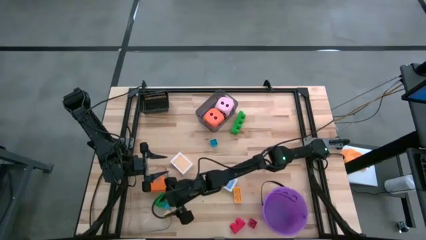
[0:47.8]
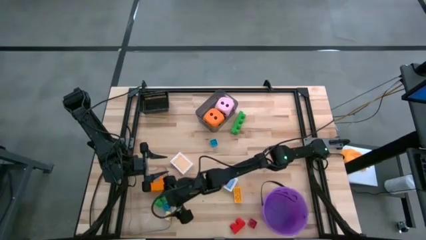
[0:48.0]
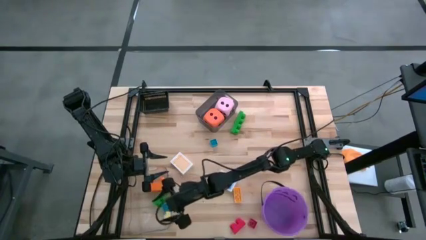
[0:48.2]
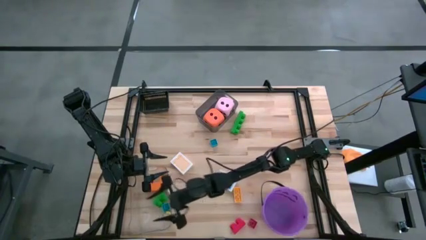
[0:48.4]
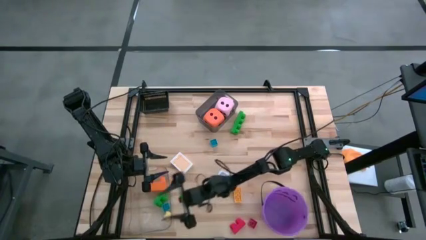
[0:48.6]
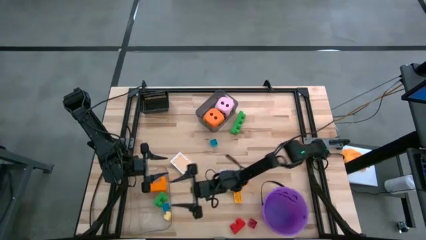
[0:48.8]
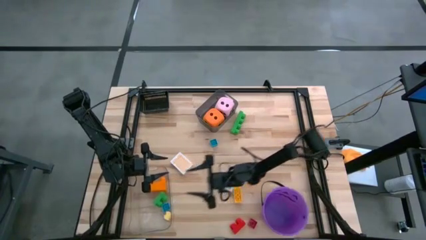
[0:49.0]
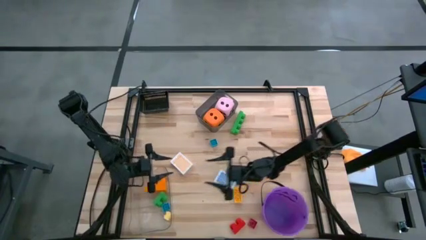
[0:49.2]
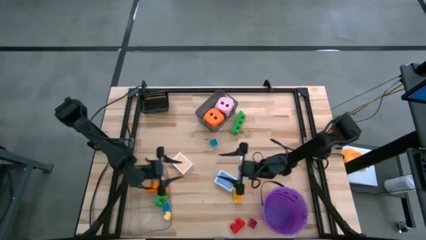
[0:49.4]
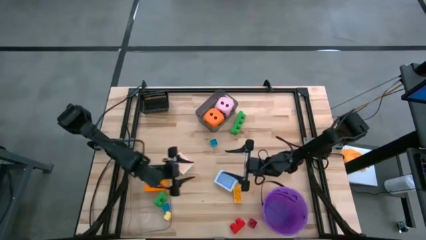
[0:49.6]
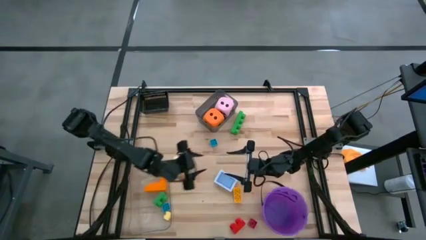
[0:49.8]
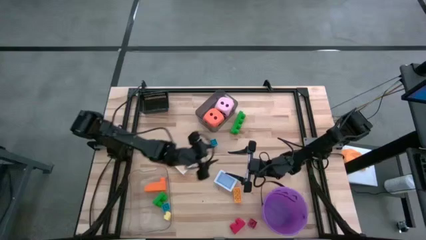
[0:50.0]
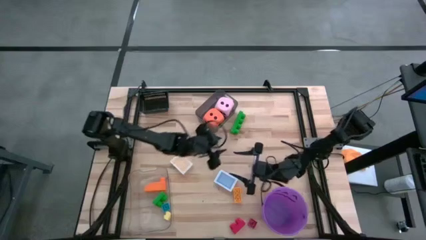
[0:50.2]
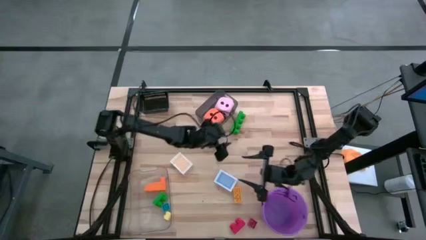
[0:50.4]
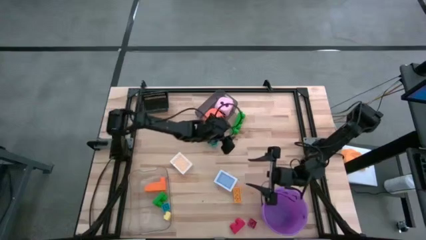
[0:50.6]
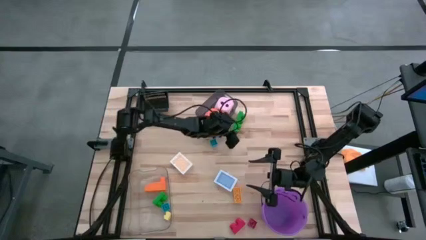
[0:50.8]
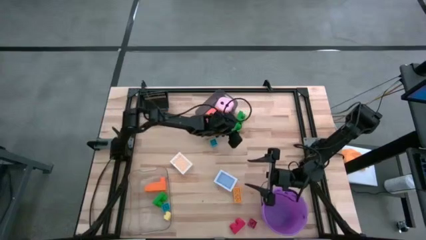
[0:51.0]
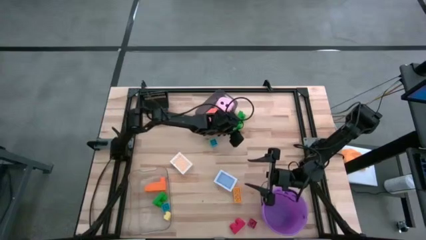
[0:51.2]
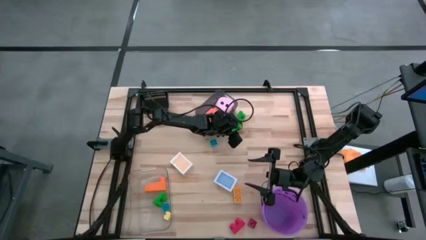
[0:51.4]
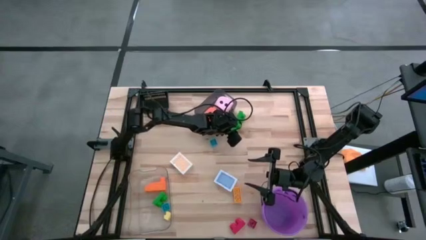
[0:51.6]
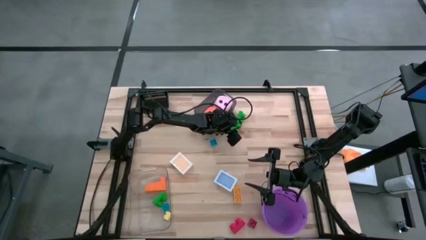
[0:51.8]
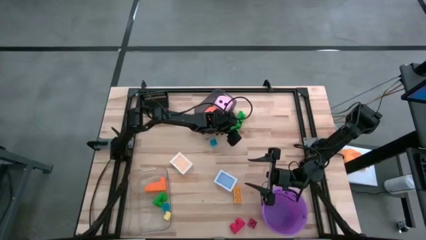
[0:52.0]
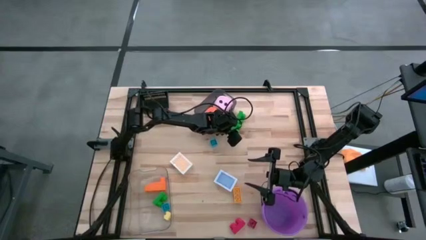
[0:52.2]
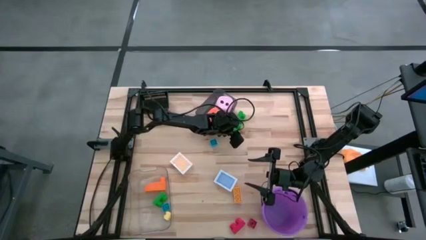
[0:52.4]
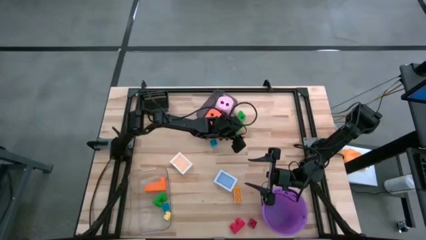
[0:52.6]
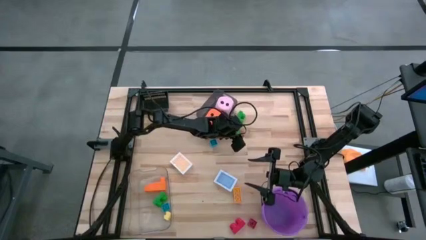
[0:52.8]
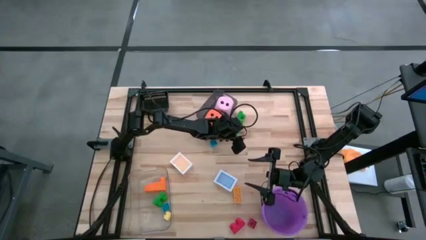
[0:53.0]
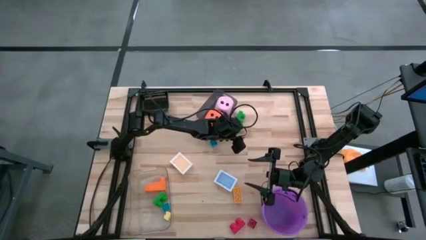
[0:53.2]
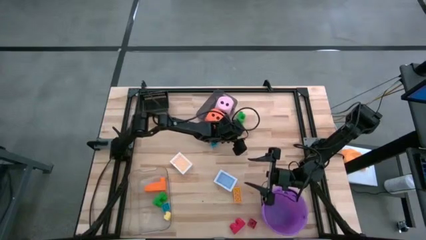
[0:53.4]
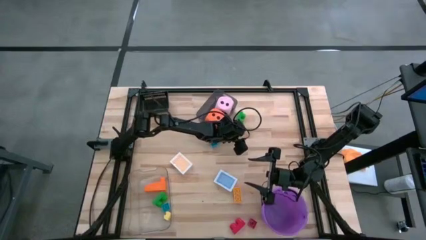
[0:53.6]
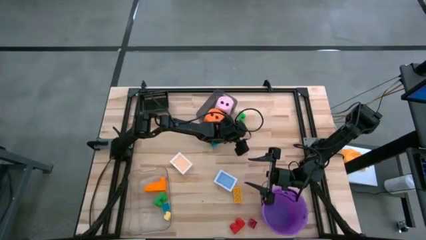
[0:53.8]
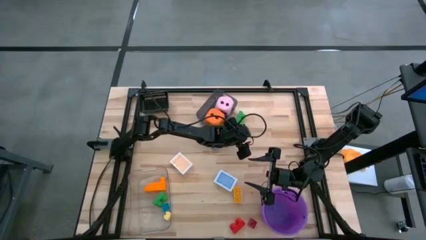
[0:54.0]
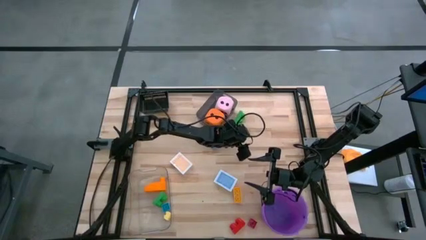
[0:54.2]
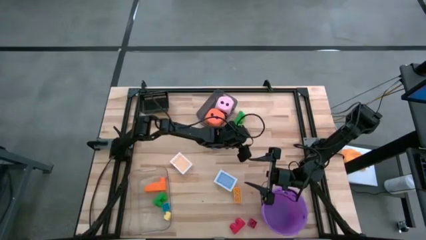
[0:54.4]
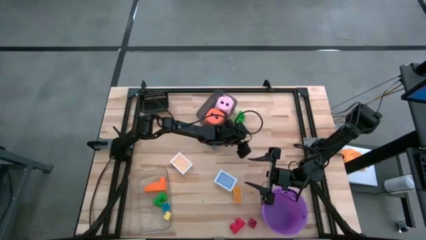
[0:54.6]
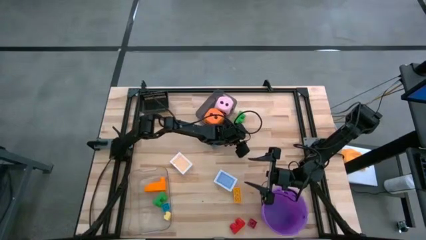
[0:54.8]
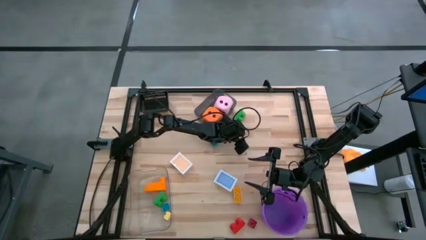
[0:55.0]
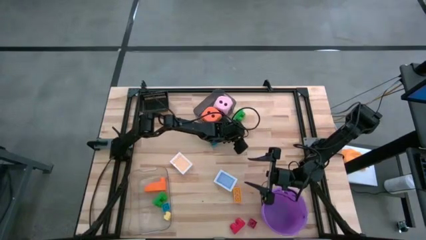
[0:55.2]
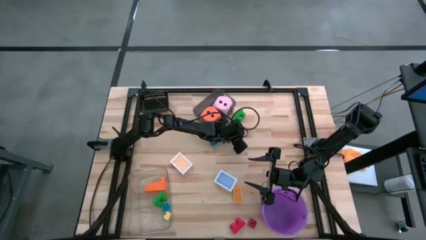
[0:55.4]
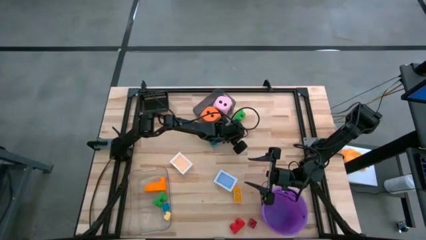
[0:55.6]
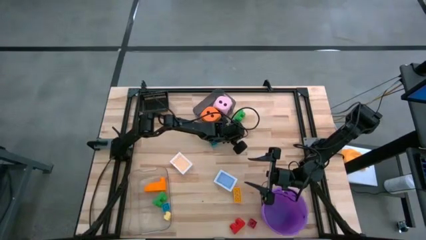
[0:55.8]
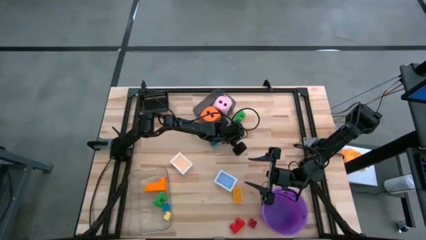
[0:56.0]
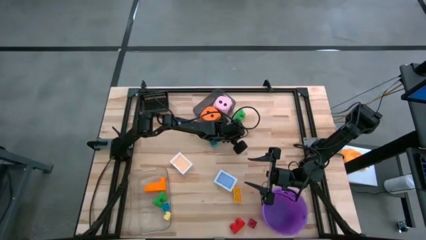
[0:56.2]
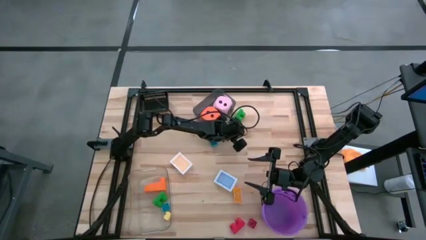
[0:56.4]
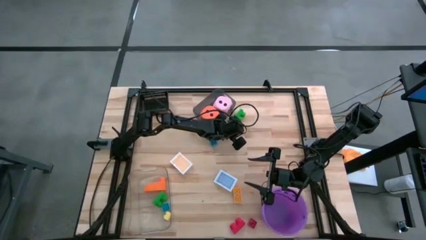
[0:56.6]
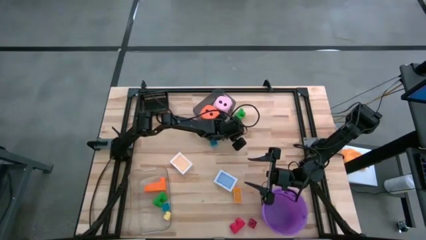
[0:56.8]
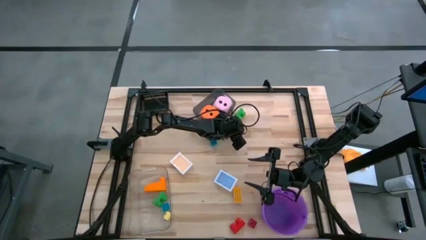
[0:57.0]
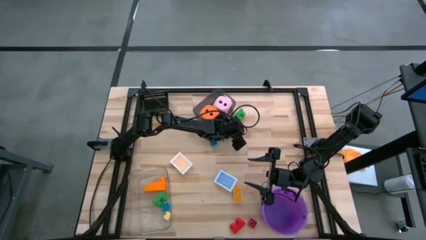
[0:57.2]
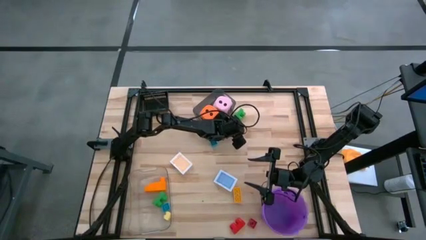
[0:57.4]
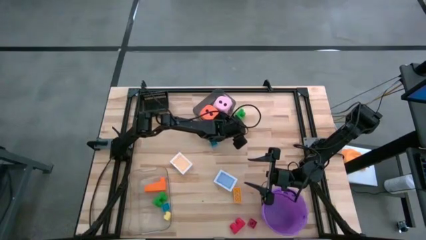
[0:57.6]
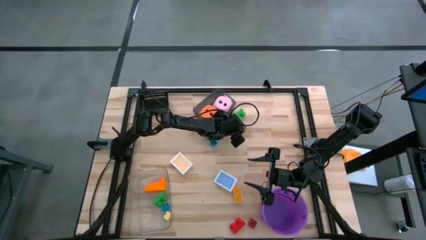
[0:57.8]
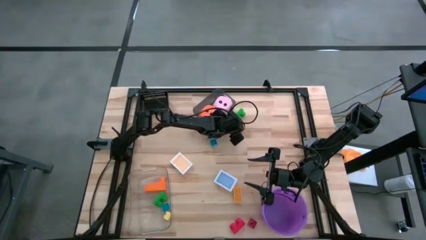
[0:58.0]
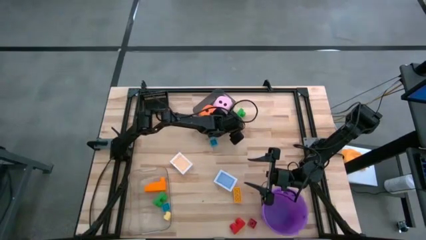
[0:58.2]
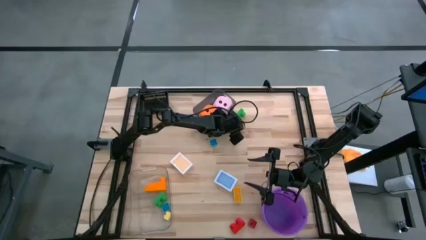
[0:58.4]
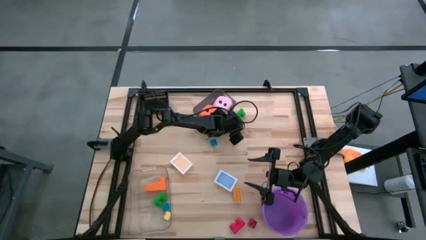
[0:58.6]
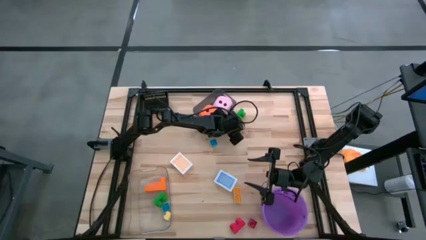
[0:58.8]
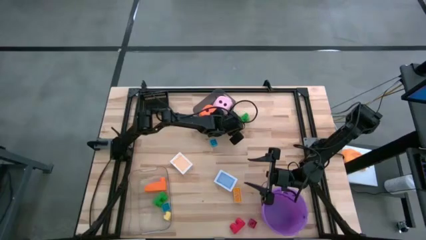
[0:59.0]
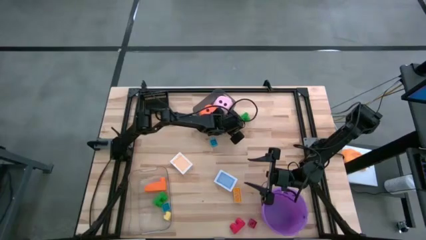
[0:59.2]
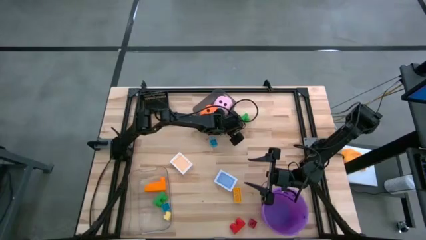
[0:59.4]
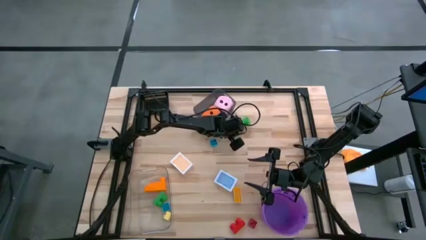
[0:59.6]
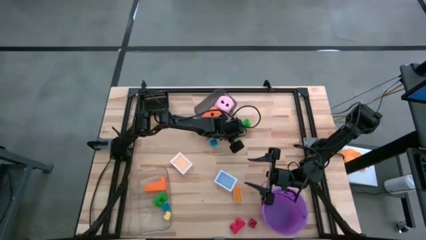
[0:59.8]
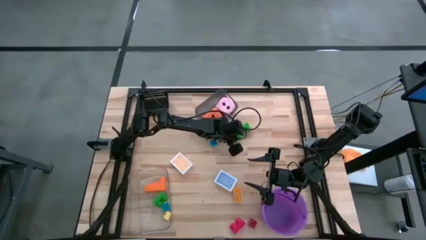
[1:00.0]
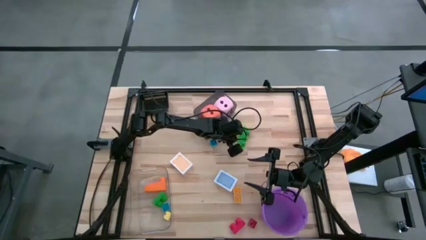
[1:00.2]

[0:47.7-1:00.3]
Task: Pick & Place Toys
Put the green game piece into the transparent bin

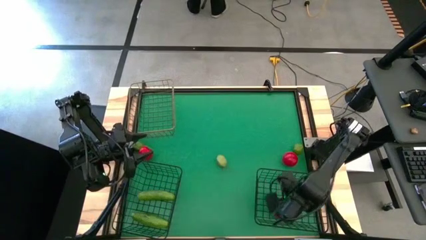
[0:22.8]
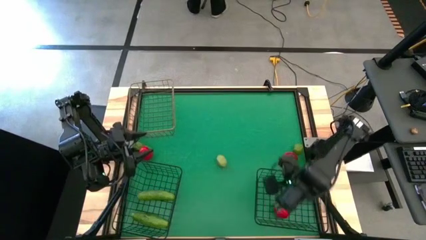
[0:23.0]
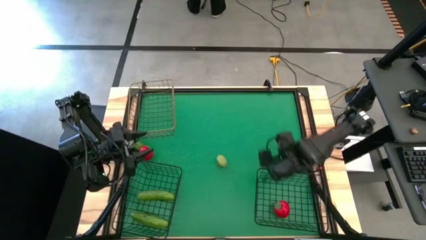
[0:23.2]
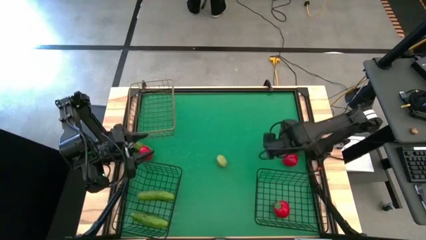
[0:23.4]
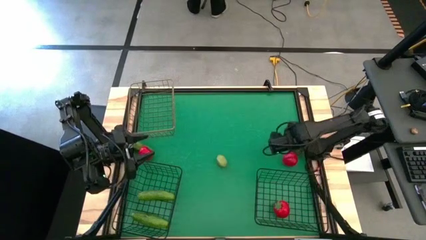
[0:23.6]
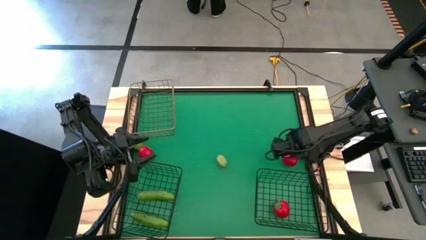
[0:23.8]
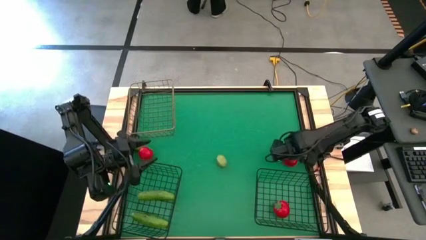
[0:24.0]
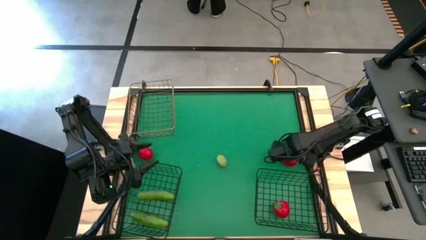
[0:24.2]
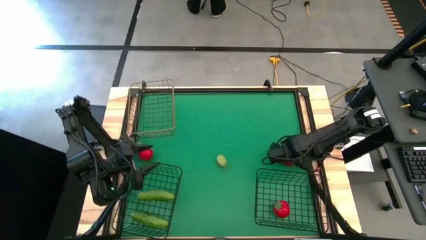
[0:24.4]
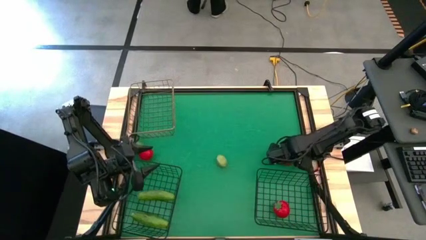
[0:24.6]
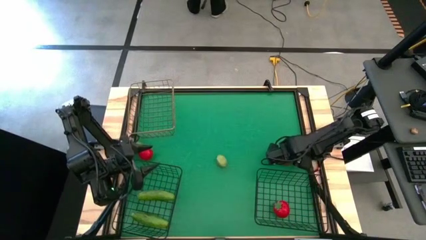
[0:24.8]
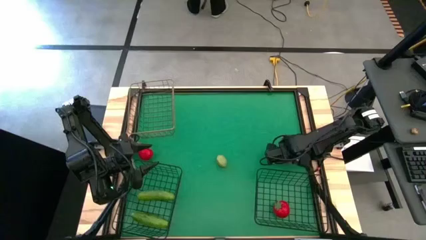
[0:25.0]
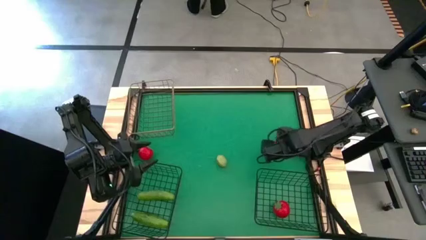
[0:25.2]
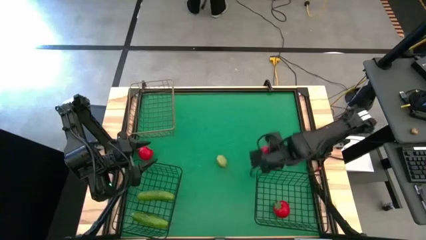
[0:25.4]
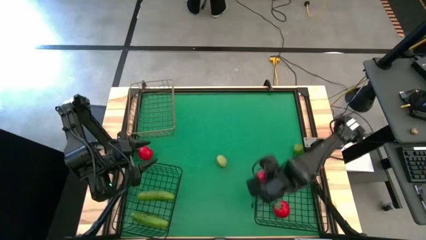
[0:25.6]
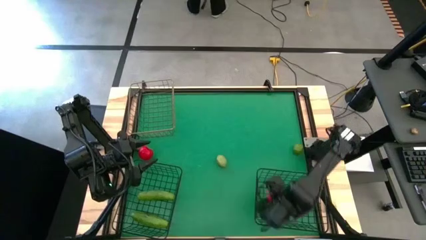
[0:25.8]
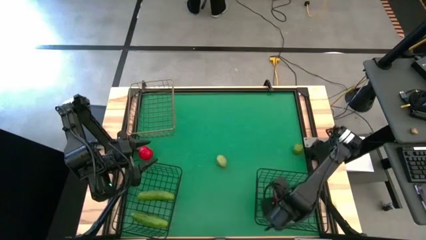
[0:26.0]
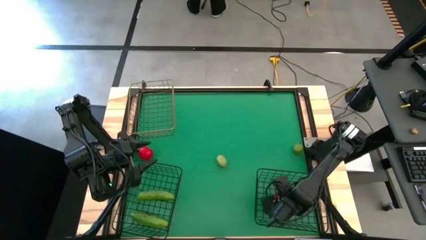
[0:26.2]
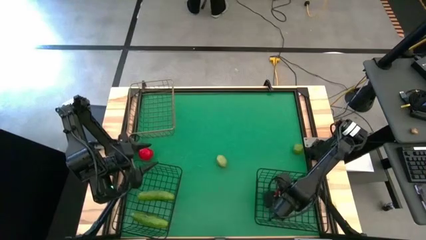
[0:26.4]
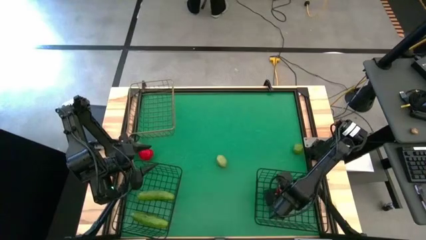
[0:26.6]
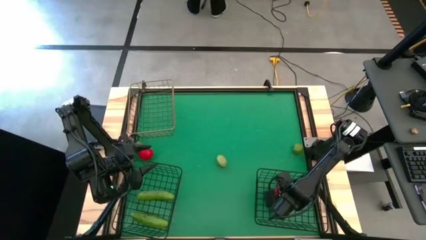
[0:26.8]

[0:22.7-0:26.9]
Task: Sort produce into baskets
Put the right tomato into the bottom right wire basket
